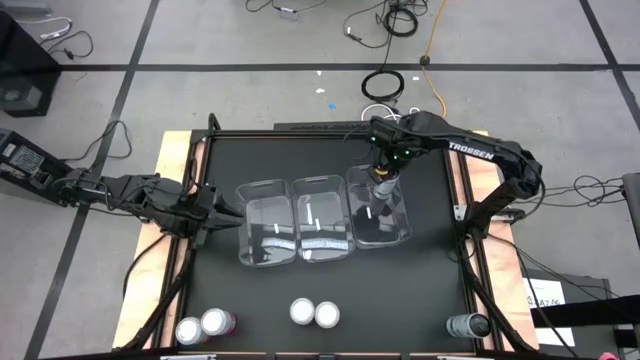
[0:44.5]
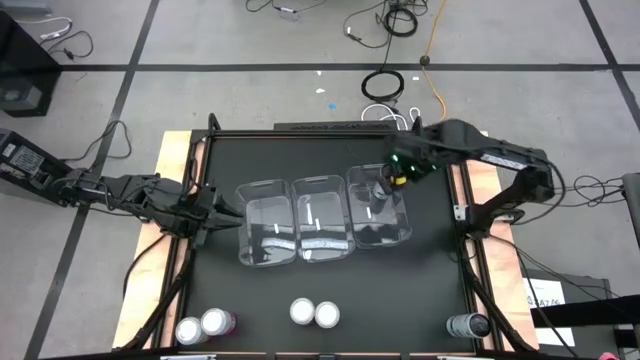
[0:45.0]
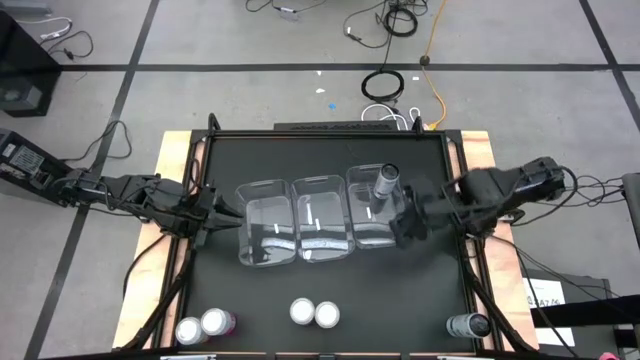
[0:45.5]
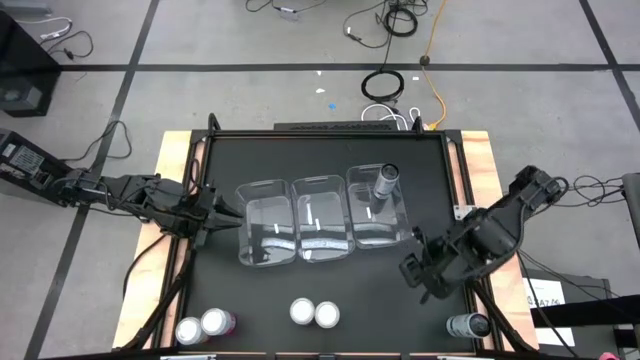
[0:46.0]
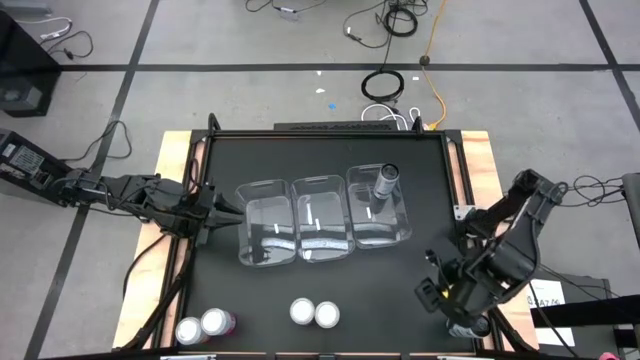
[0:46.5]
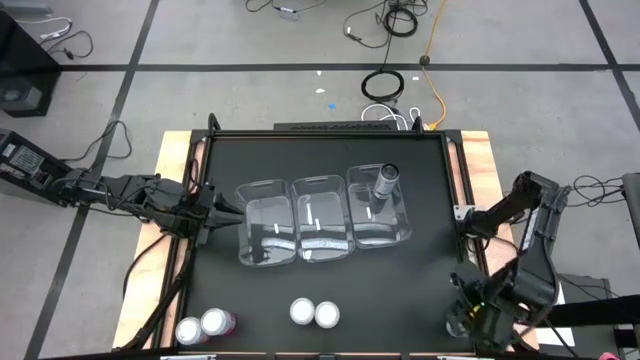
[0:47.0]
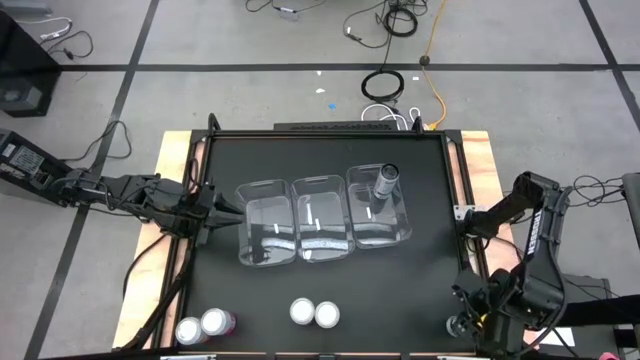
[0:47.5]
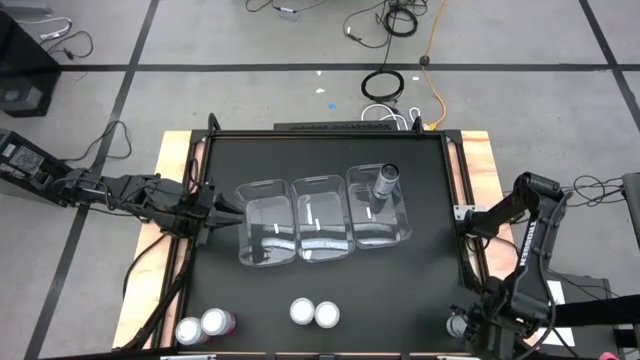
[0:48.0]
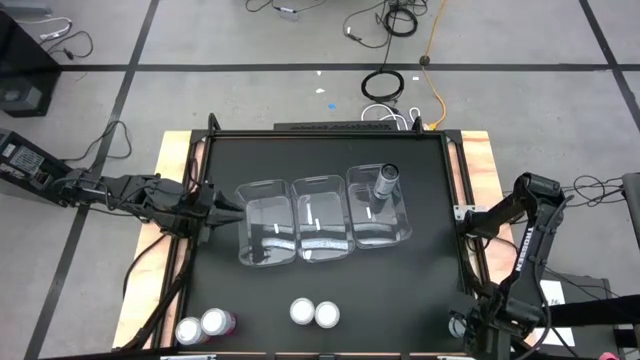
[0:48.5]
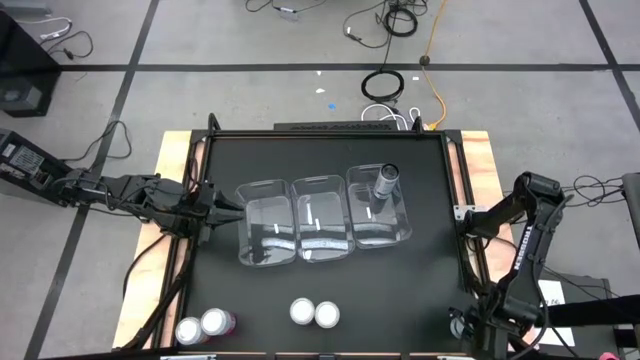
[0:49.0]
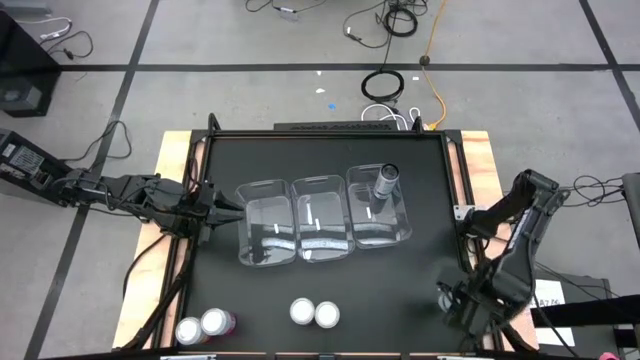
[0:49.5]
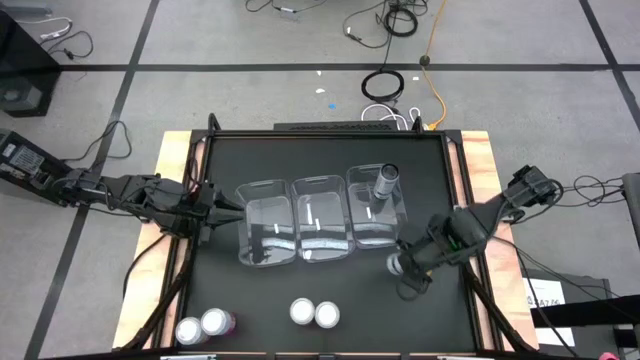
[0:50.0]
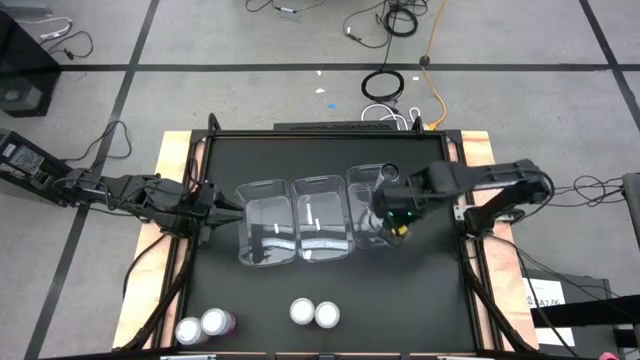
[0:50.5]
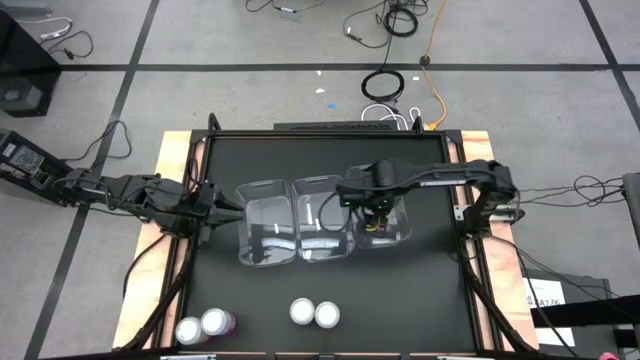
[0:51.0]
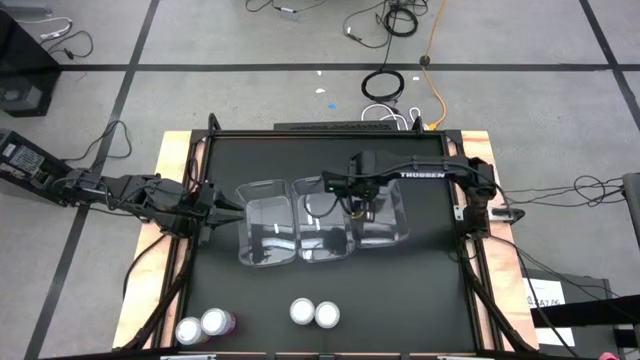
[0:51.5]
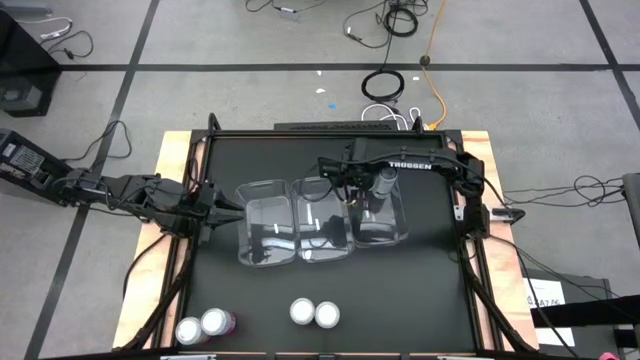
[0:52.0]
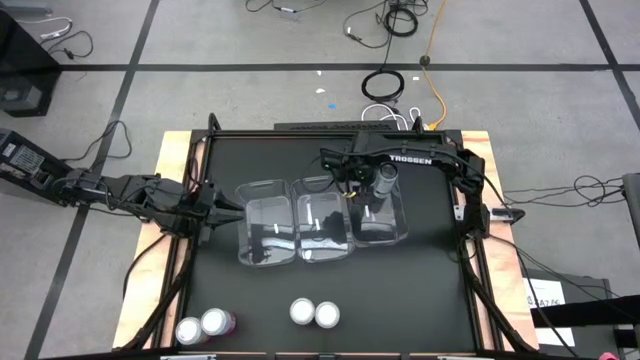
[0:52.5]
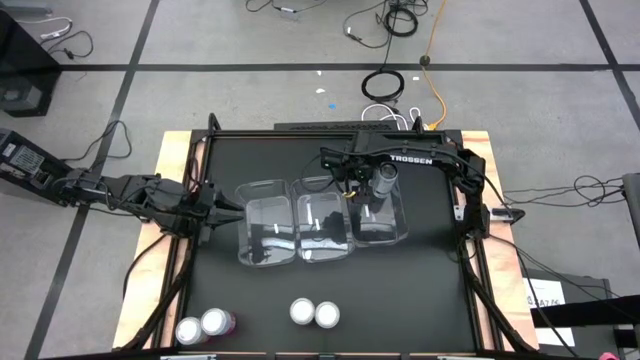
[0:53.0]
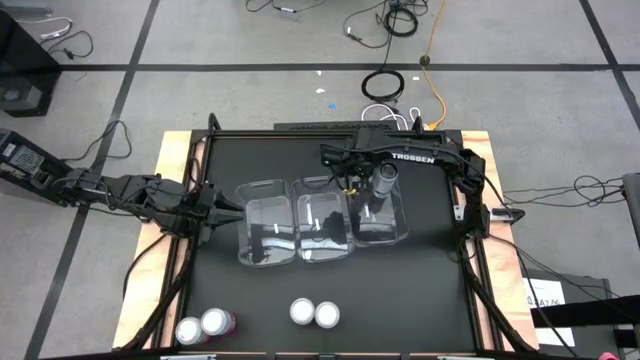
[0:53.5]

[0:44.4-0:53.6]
Task: Sort soda cans
Put the black soda can into the right transparent bin

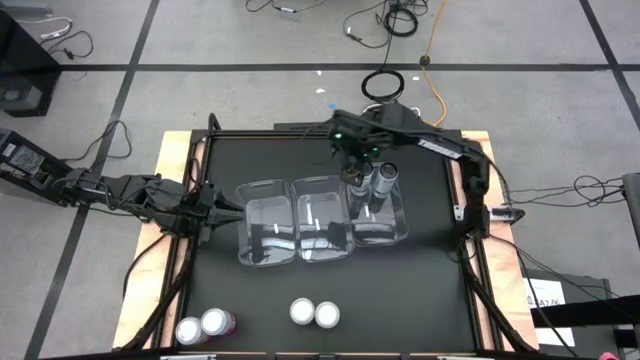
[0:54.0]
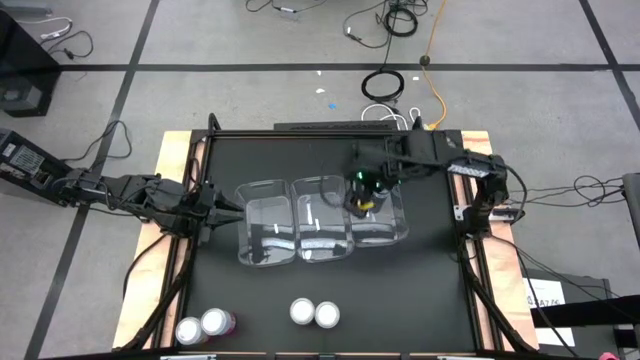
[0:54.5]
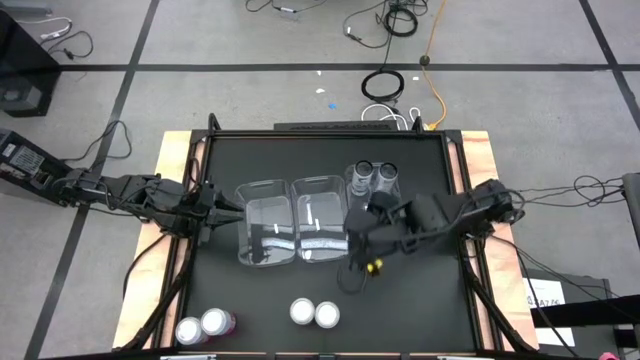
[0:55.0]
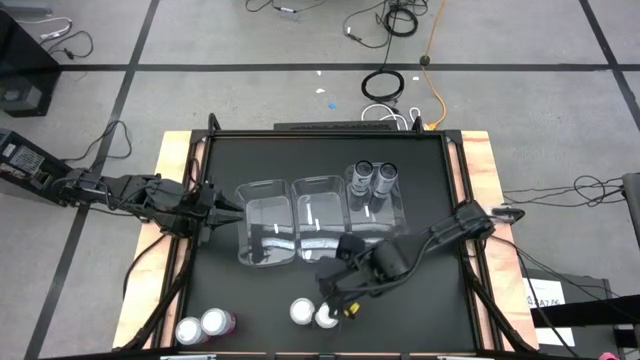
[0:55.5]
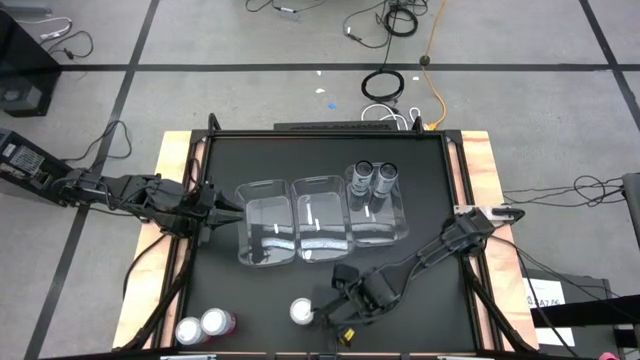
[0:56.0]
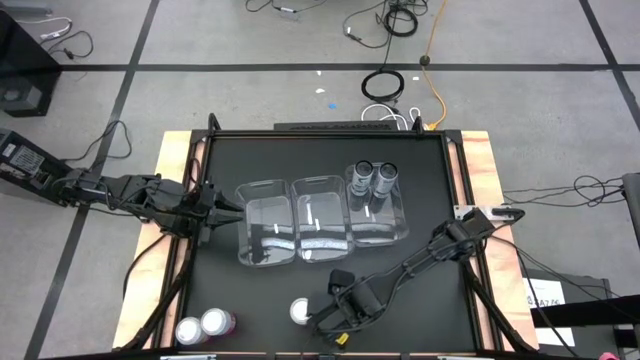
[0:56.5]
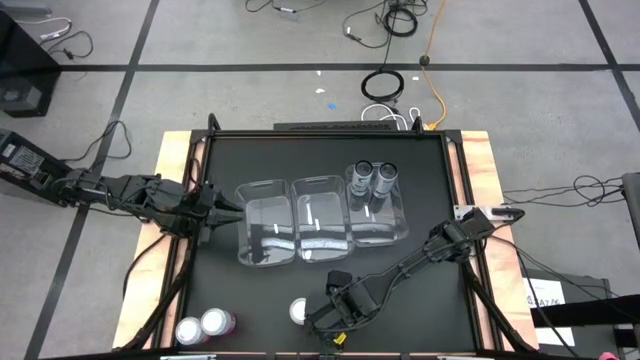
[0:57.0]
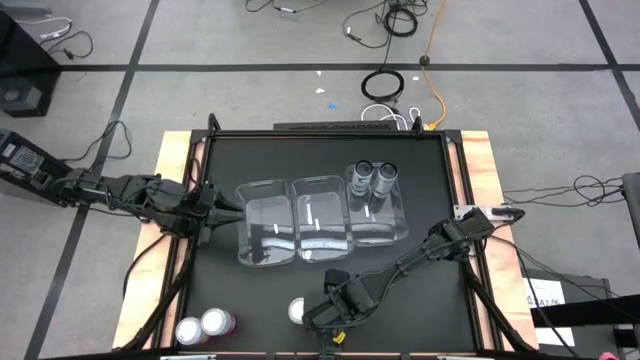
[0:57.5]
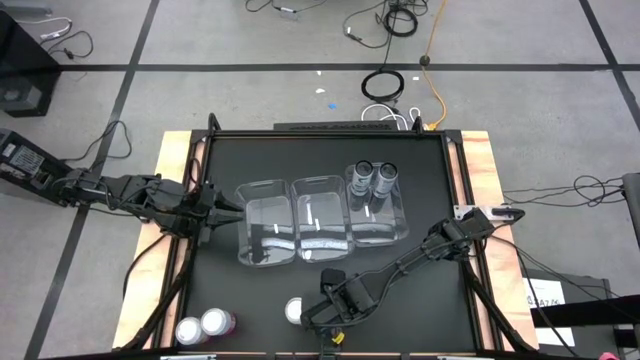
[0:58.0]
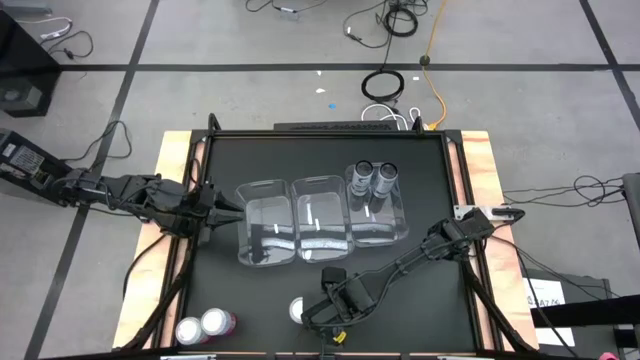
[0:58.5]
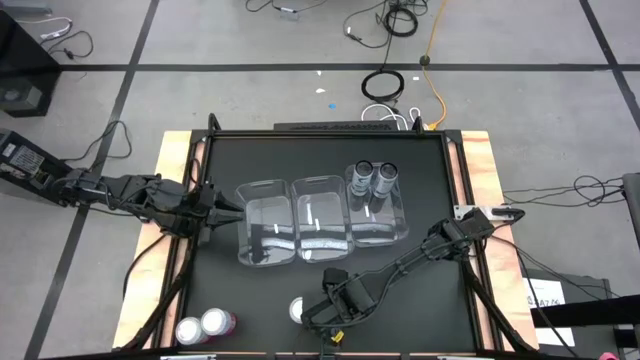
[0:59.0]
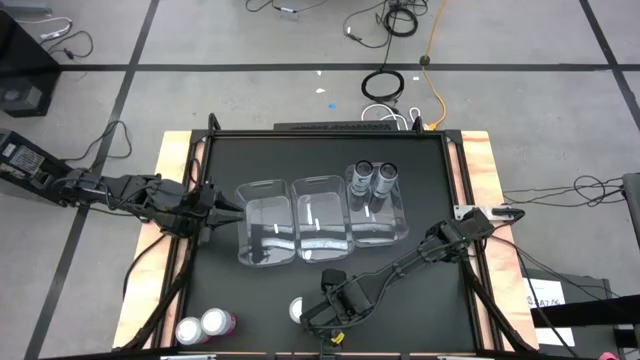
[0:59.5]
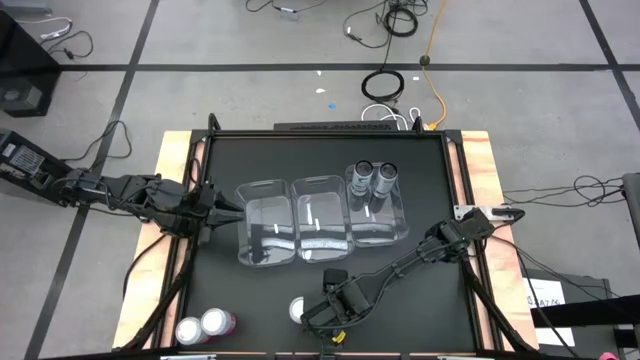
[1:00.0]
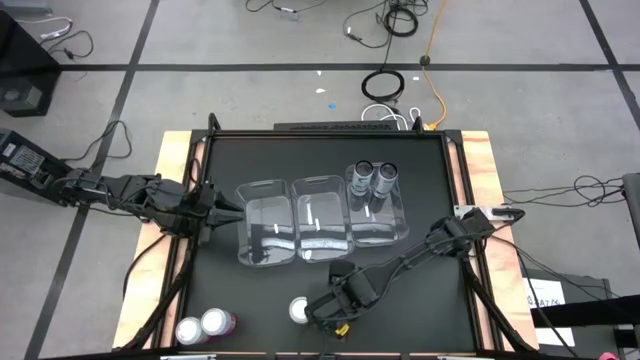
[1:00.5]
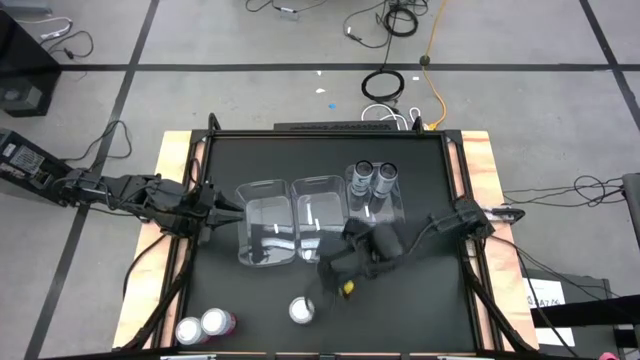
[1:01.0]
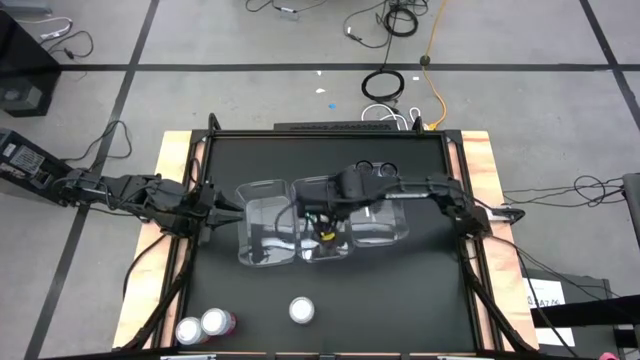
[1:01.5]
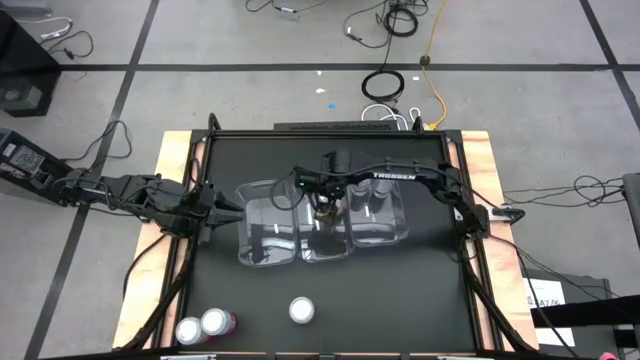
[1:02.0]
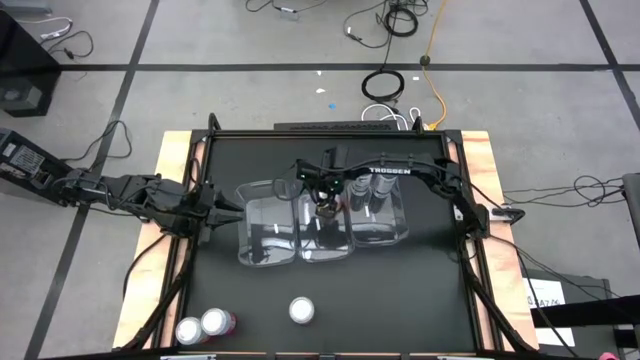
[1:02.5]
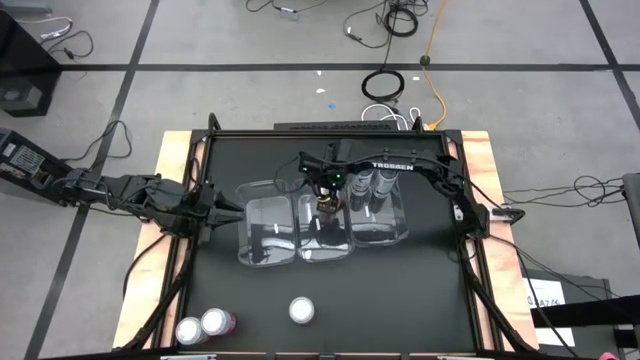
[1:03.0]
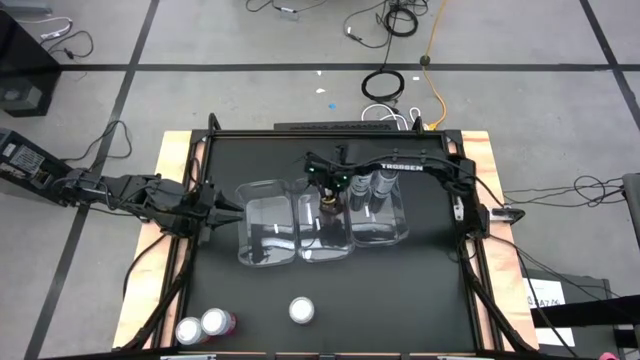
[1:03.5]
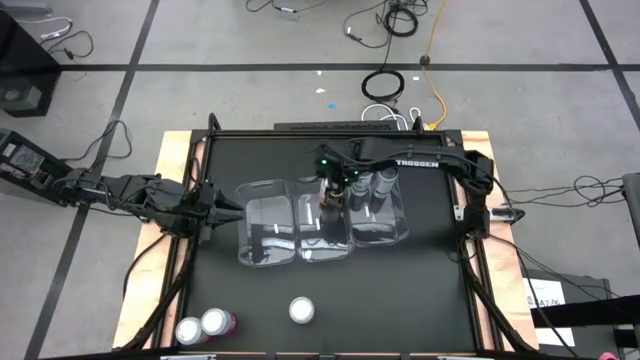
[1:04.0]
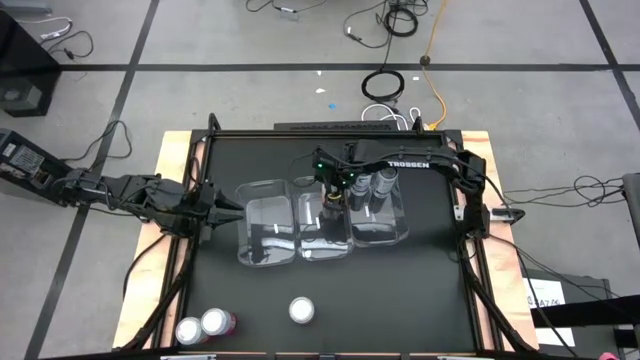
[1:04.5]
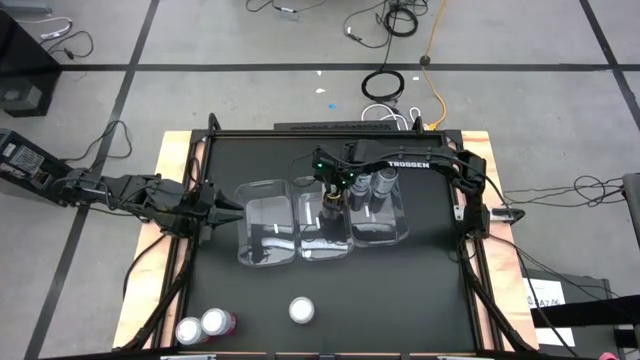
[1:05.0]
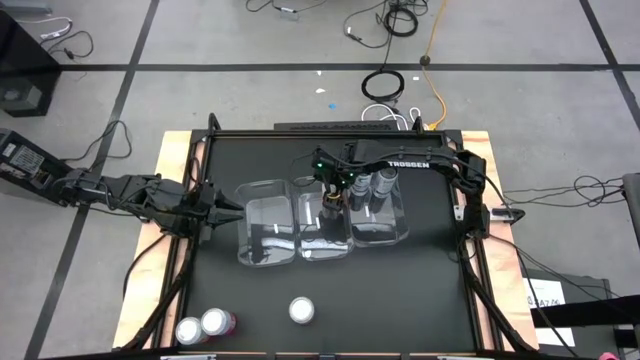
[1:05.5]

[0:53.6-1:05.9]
Put the right orange soda can into the center transparent bin

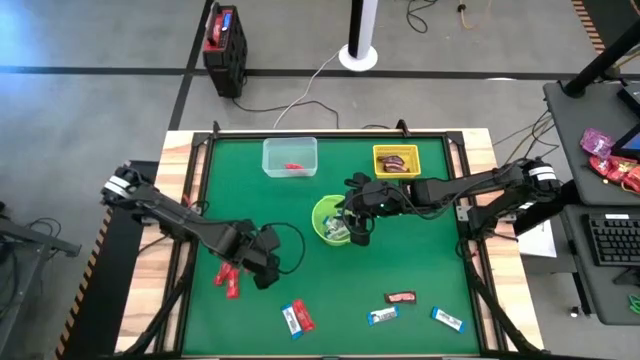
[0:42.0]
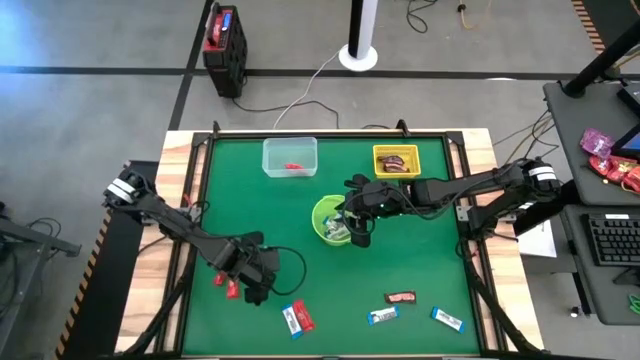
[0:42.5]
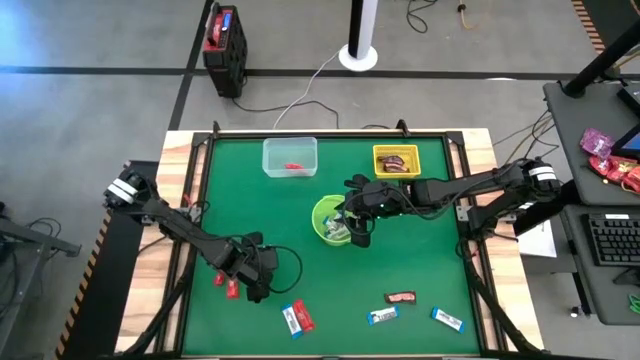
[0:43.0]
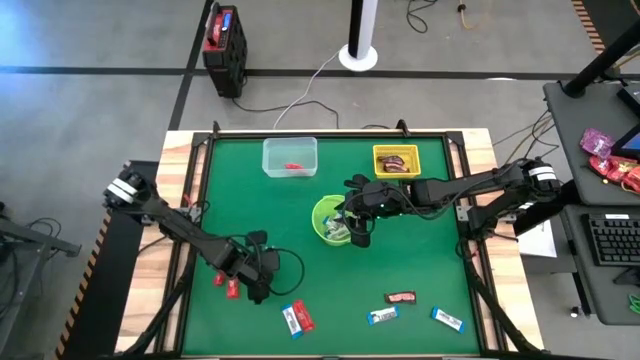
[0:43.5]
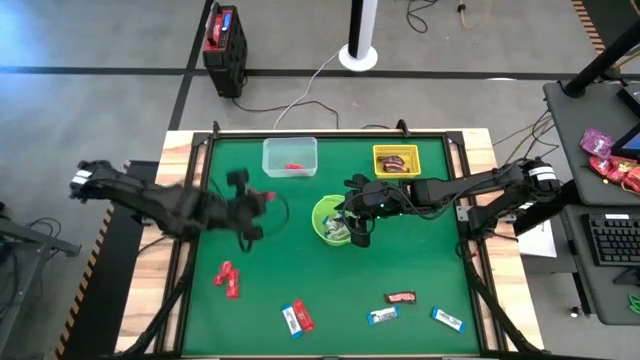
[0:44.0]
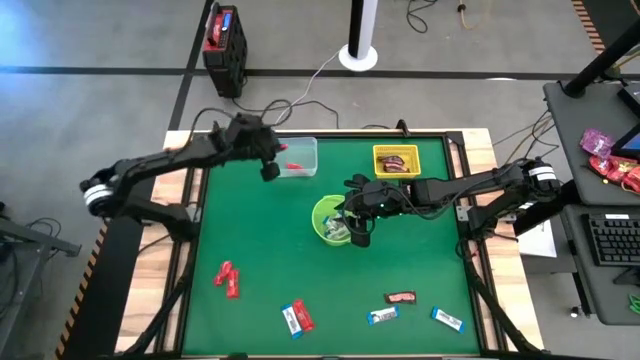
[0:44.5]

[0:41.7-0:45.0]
Task: Sort candy by brand, put in halloween buckets
Put the red chocolate into the transparent bin
